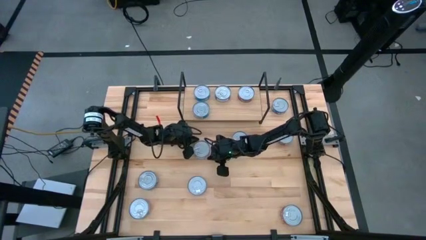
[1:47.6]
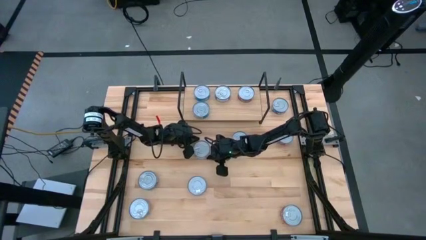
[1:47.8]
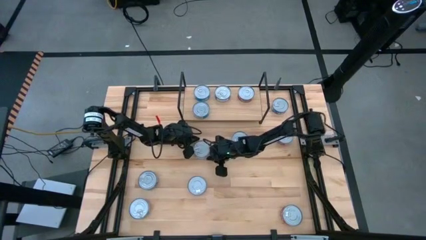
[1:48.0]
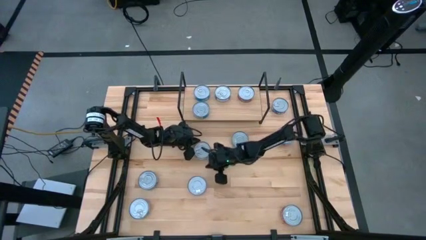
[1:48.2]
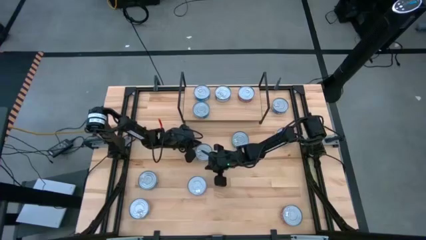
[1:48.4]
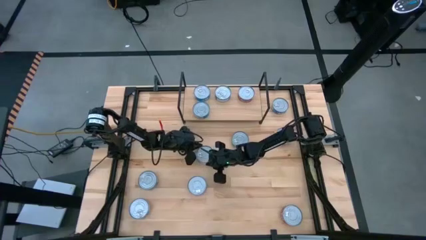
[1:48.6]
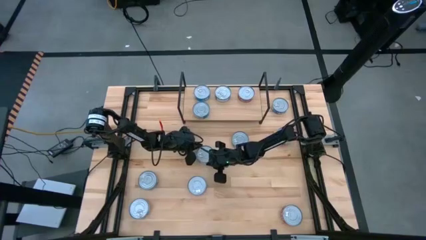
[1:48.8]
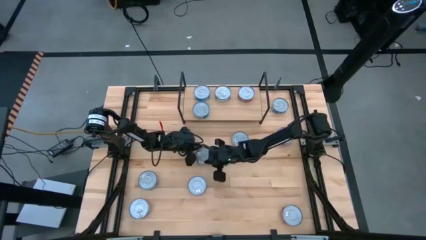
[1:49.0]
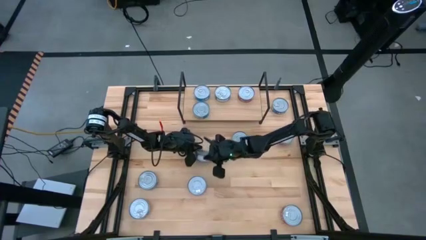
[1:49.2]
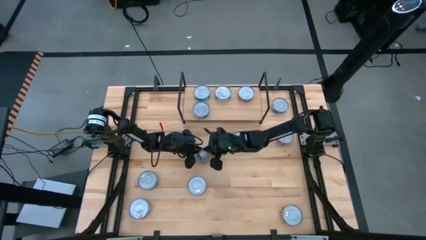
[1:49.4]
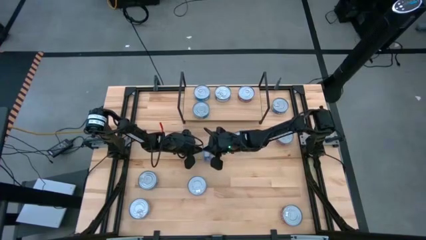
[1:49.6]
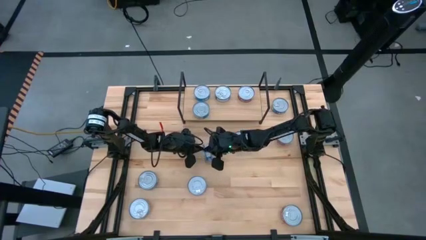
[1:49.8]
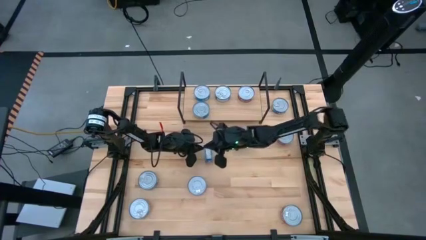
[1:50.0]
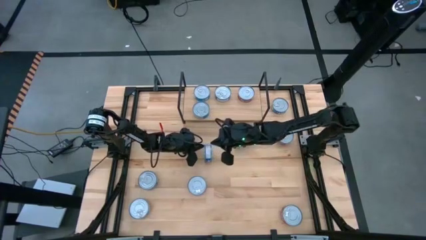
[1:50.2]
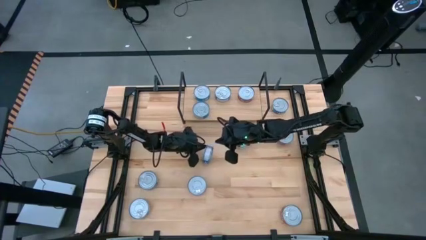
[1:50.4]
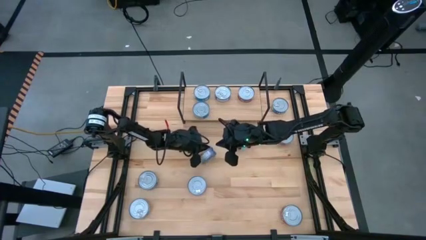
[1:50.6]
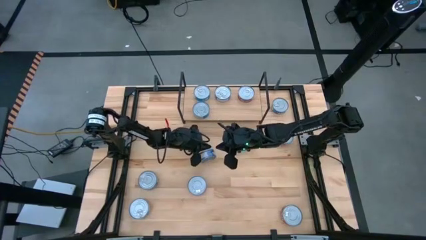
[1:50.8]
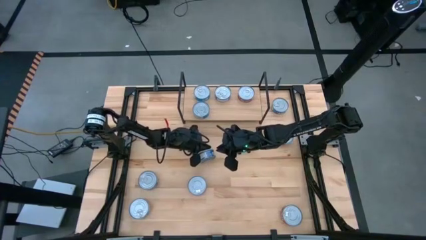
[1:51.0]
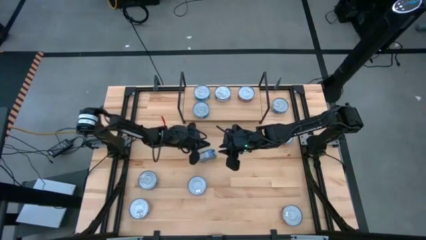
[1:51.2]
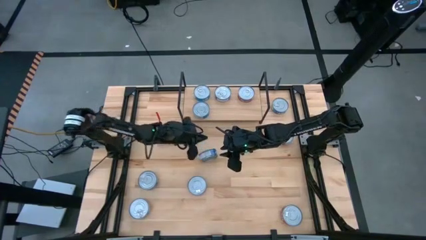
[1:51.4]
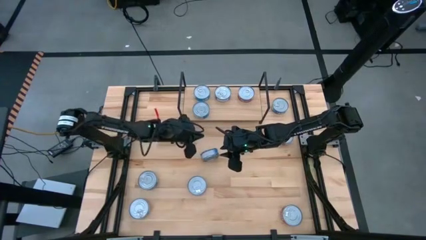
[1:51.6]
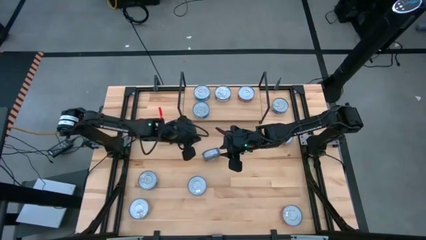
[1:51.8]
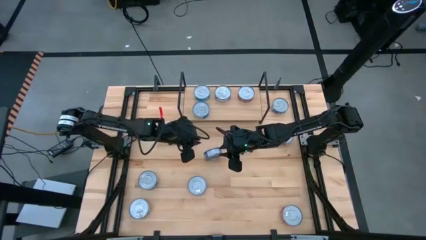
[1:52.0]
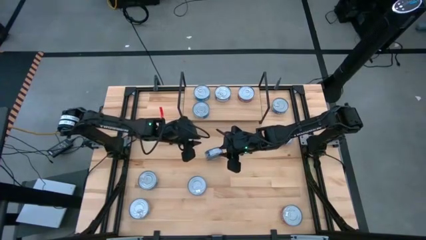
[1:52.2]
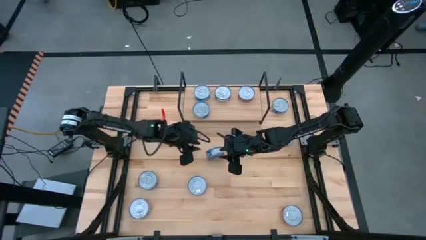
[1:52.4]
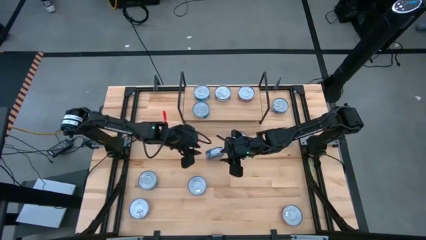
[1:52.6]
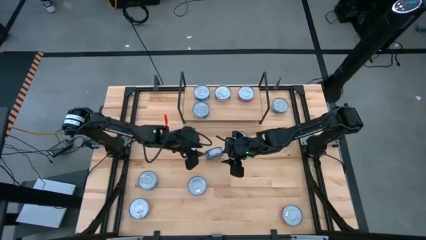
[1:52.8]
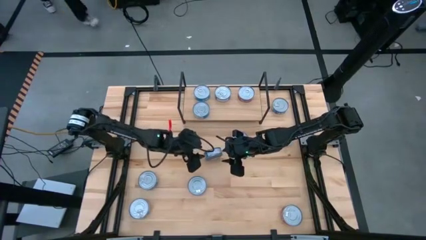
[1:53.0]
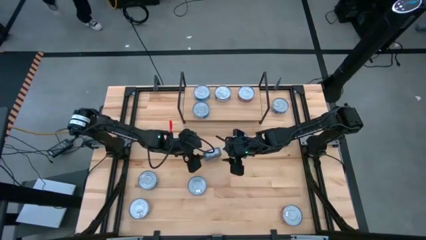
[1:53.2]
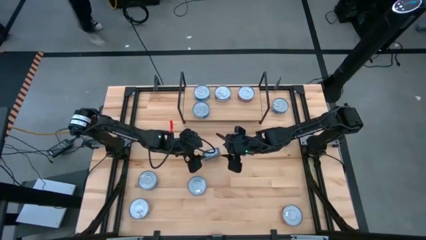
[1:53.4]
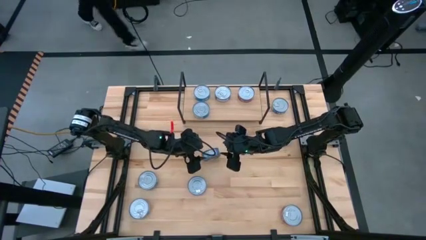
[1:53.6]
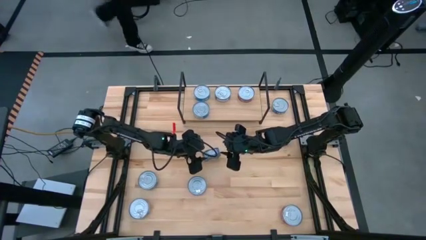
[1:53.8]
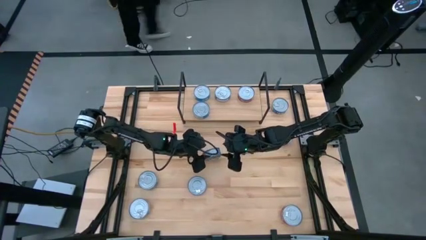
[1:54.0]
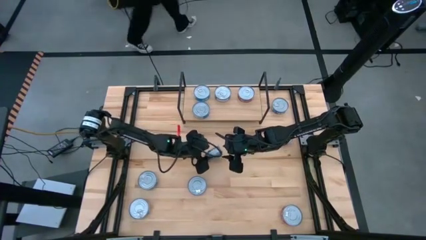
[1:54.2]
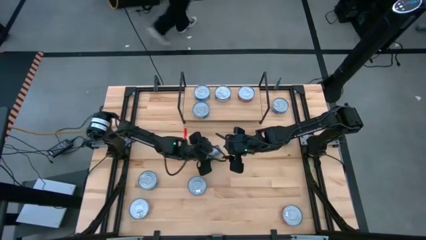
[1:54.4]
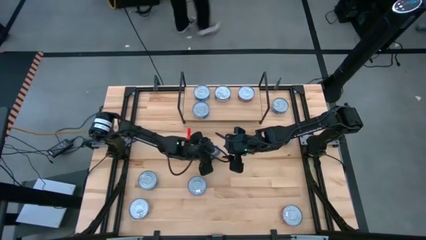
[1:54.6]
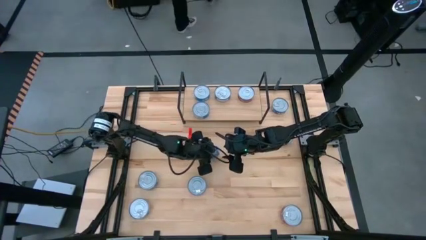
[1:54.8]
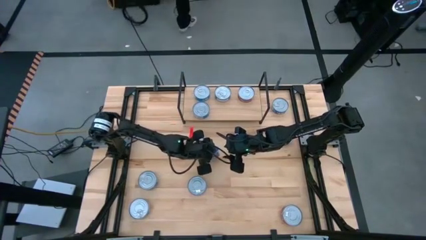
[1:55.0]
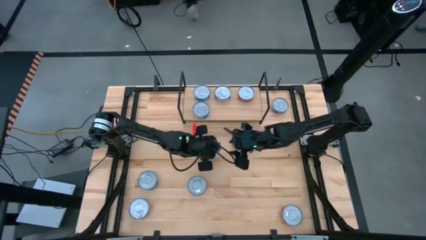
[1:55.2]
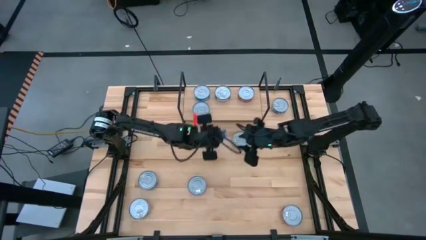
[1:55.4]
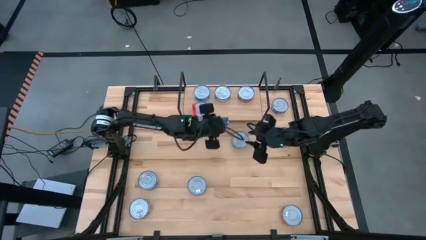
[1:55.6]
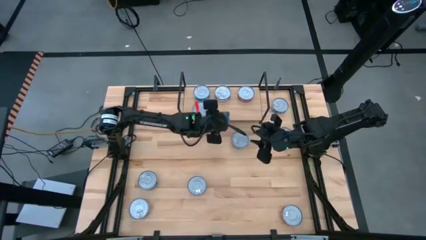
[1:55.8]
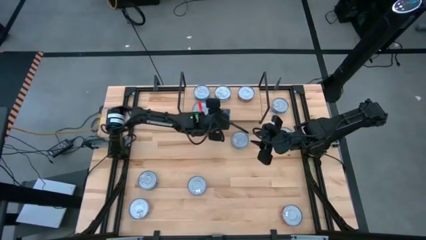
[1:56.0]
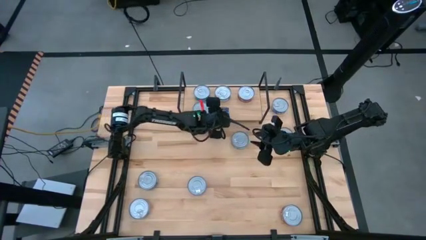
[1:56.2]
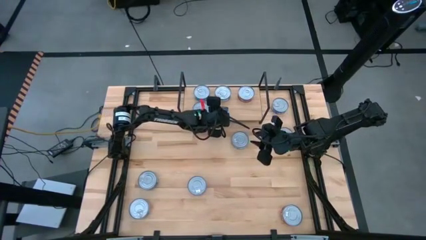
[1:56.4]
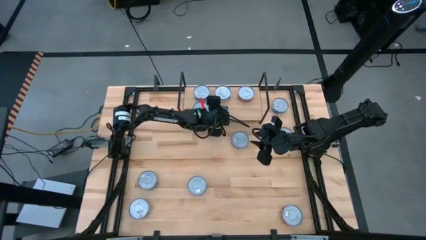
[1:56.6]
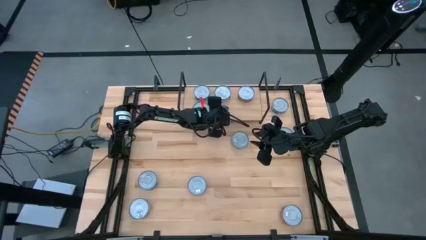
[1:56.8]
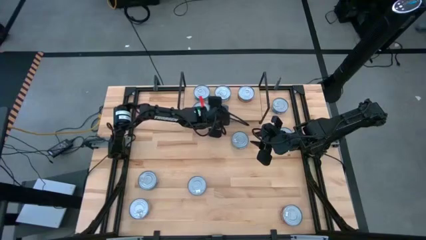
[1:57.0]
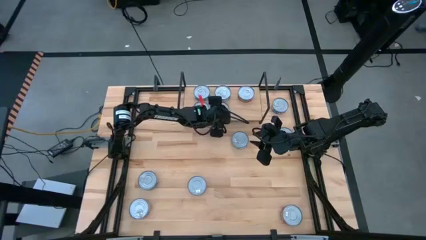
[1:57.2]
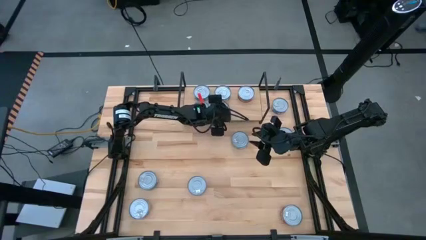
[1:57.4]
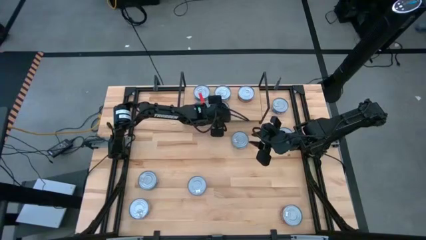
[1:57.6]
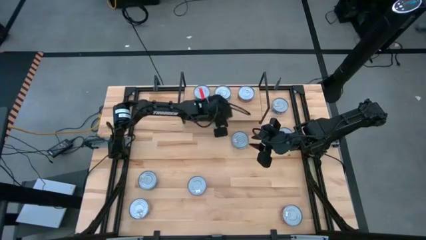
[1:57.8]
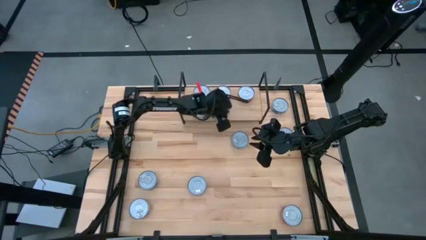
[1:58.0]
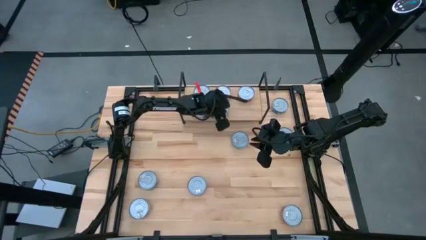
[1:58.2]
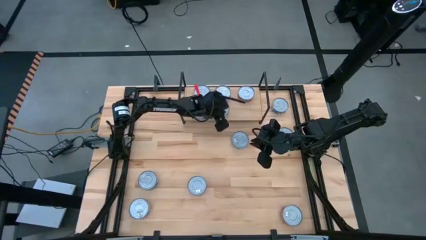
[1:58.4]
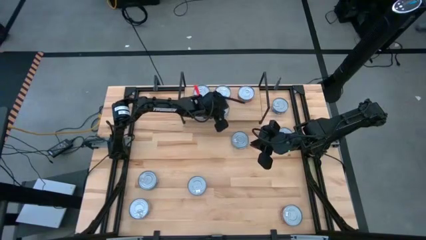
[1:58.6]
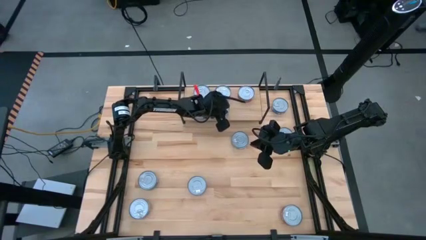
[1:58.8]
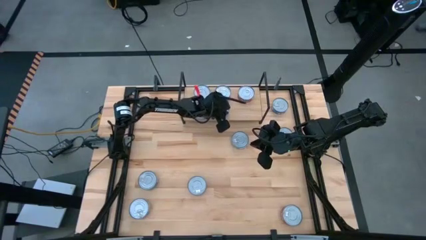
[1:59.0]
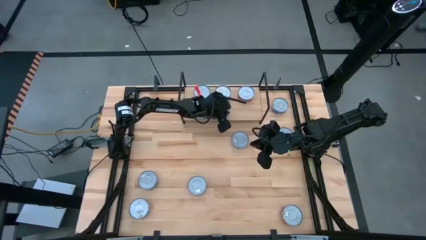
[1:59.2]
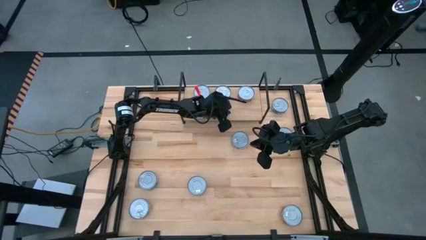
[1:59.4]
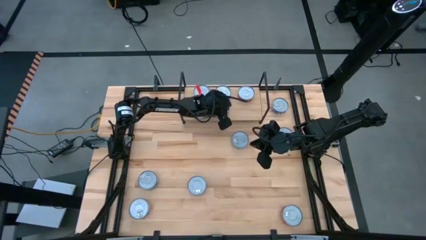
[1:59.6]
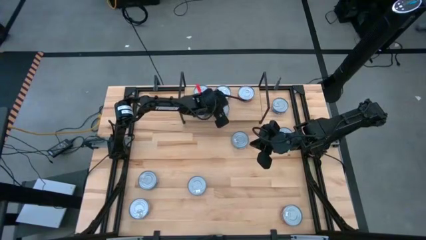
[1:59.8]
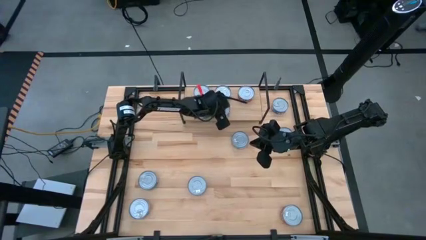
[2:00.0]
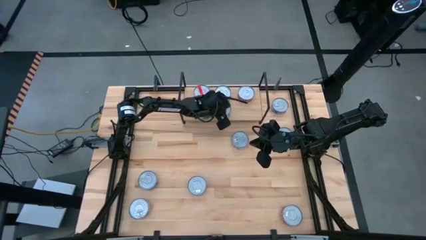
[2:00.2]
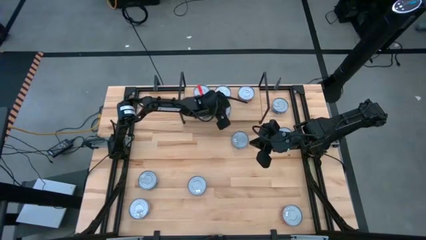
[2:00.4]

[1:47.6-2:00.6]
Task: Stack canned seafood by type on shelf
Put the blue tuna can on the shelf

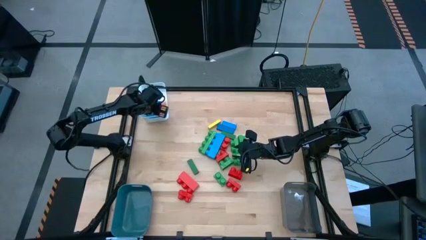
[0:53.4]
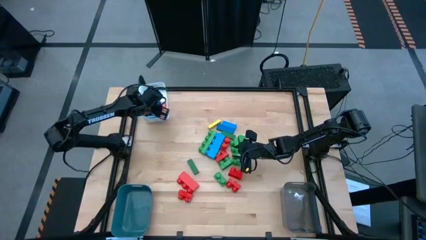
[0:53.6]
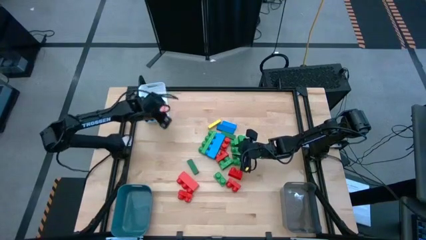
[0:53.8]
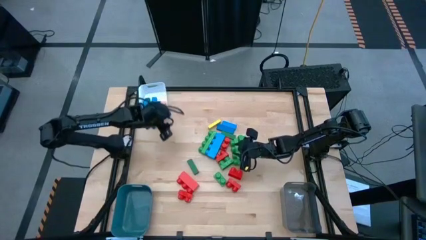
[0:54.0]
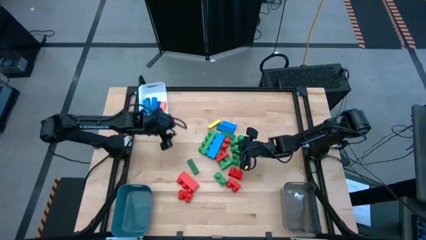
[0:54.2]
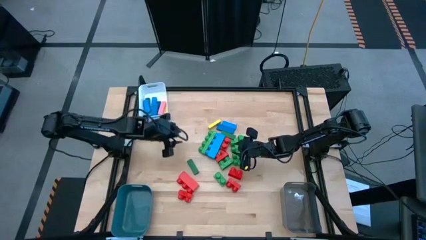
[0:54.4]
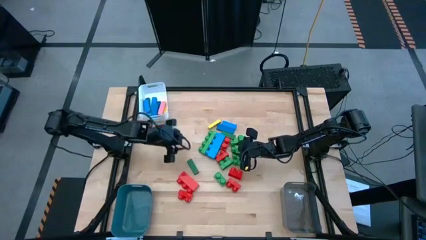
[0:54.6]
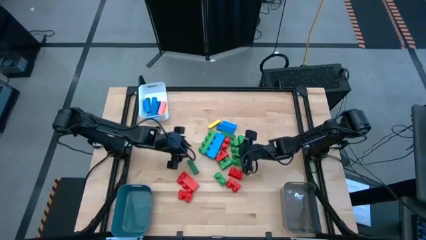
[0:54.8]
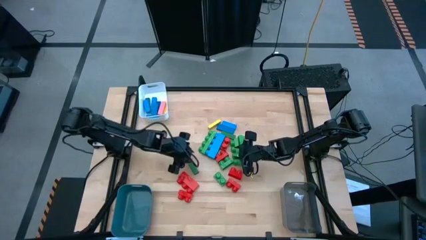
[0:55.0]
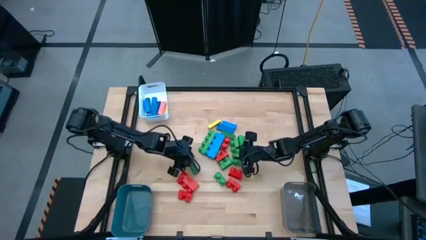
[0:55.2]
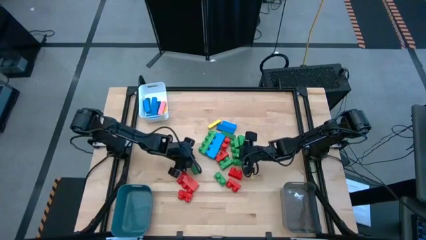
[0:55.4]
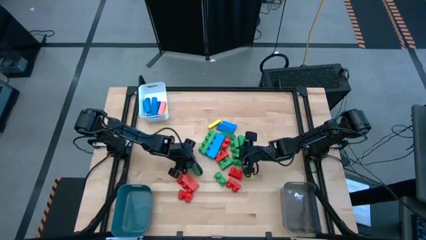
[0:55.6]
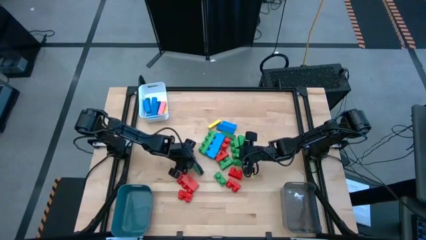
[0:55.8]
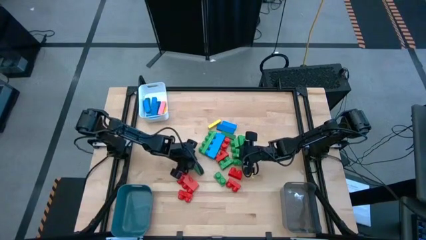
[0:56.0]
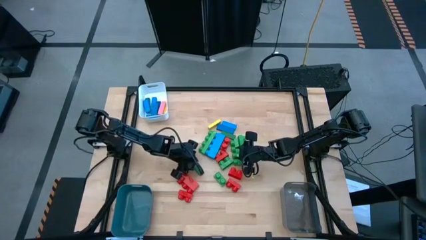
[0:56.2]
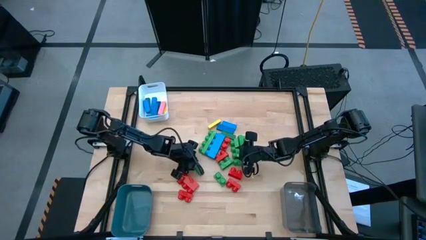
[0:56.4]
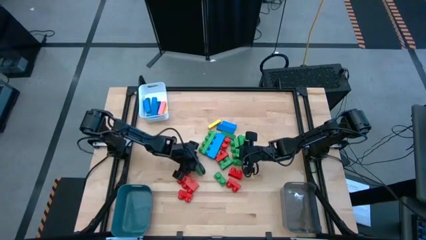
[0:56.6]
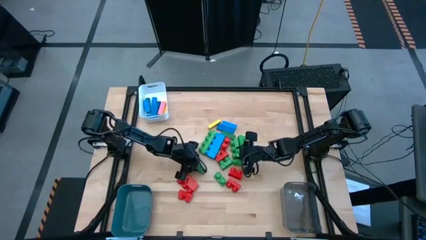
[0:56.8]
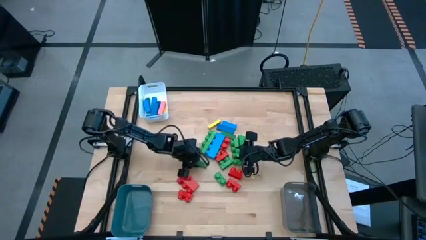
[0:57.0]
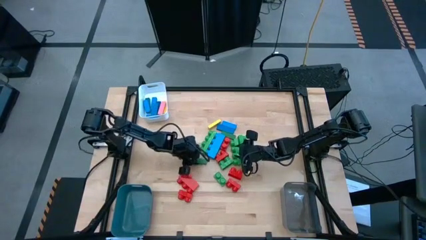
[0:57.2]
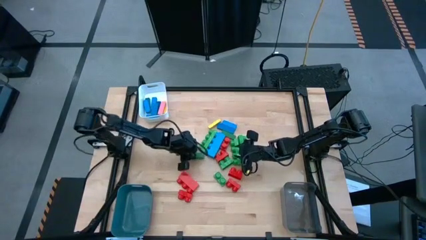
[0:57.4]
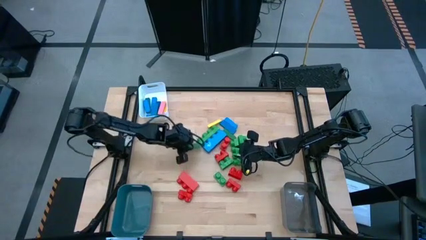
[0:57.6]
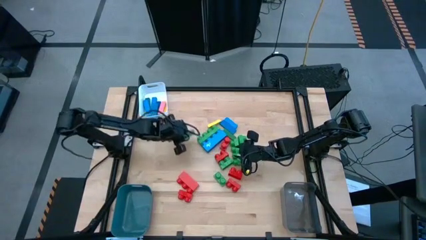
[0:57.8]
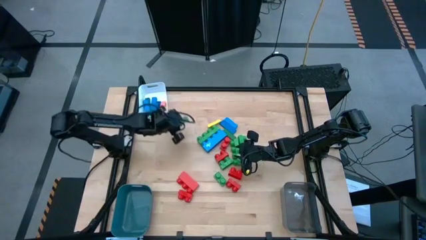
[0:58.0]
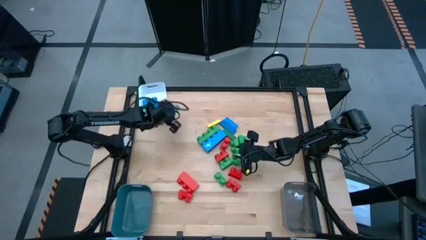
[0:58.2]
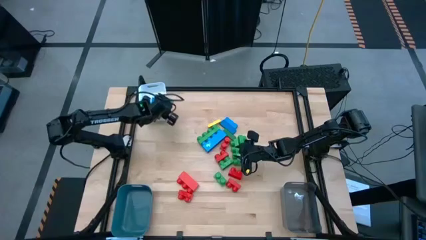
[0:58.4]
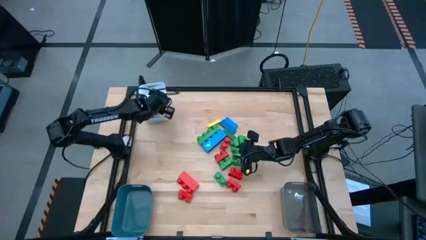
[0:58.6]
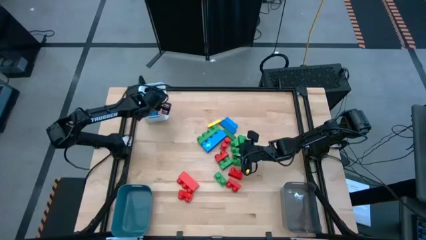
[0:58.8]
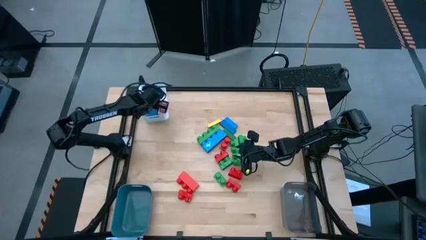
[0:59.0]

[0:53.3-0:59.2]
Task: Sort blocks by size
Put the green block into the white bin
